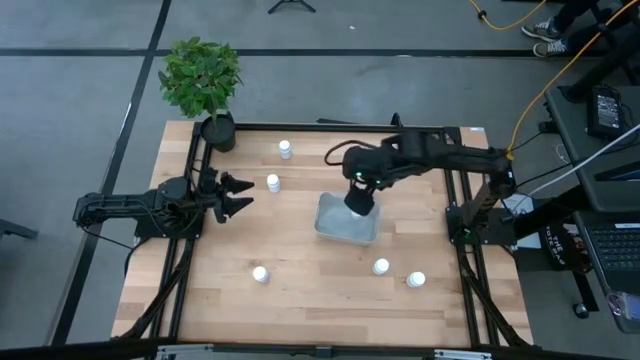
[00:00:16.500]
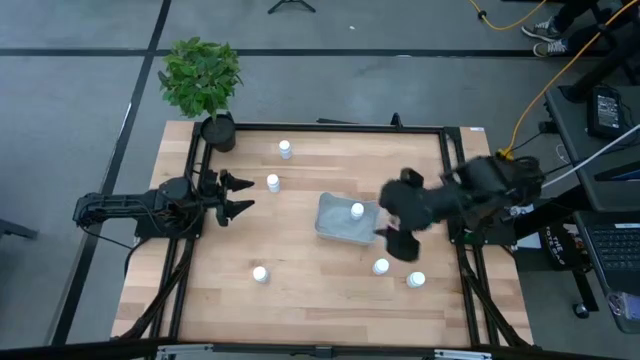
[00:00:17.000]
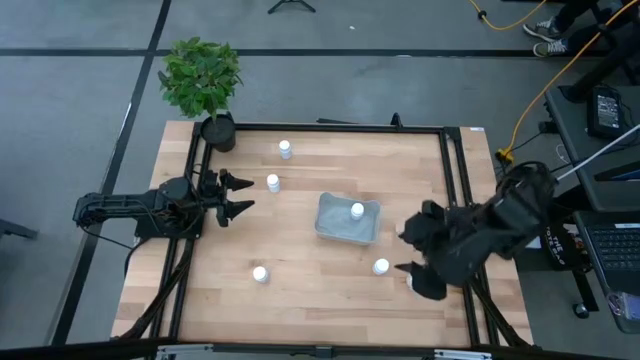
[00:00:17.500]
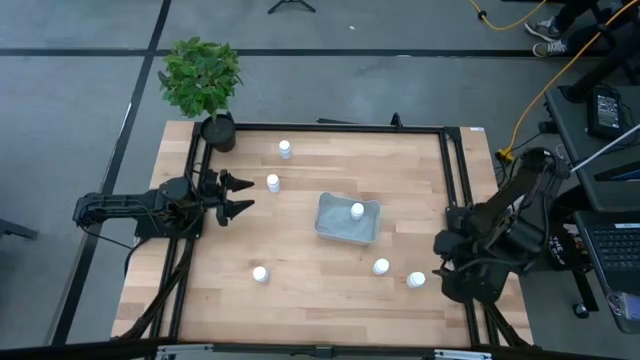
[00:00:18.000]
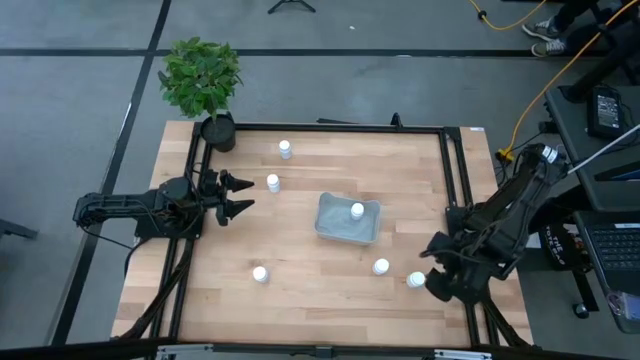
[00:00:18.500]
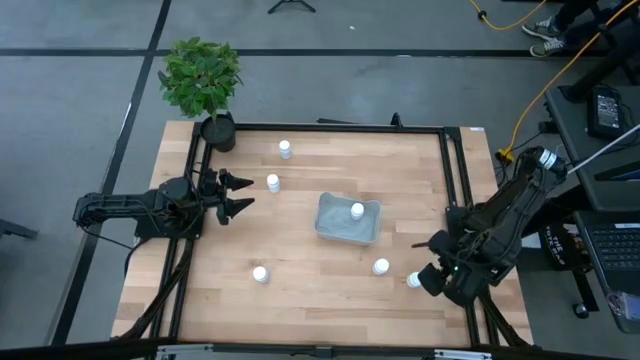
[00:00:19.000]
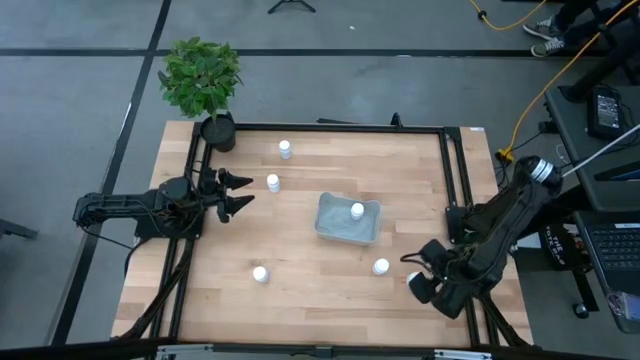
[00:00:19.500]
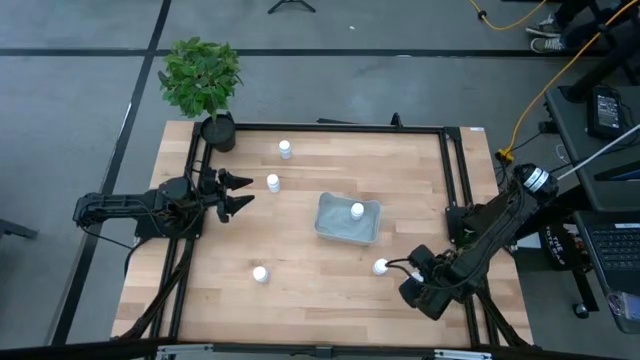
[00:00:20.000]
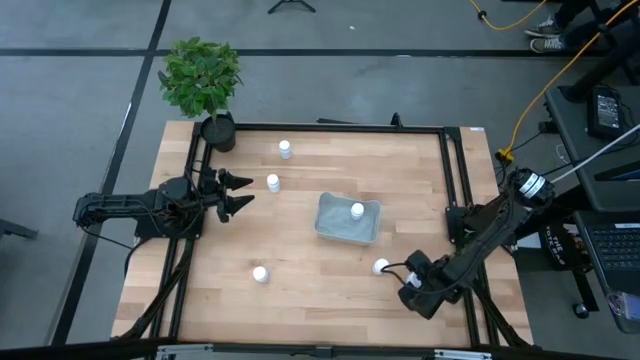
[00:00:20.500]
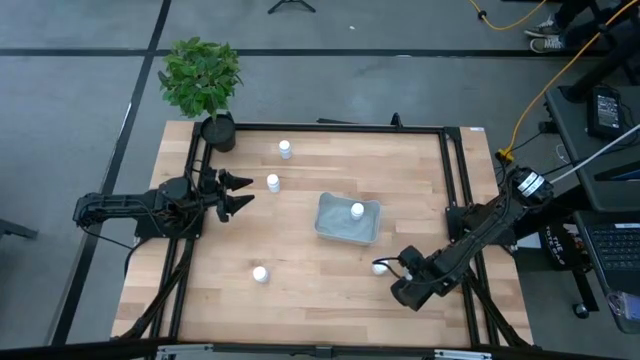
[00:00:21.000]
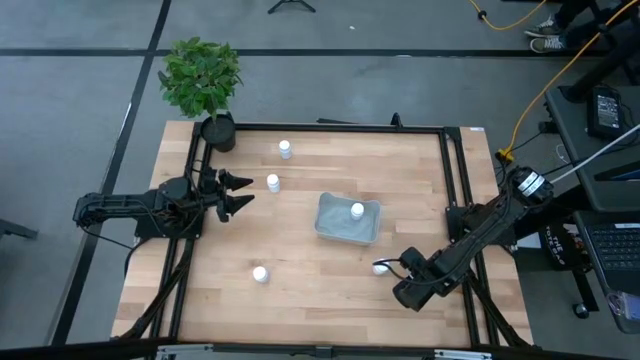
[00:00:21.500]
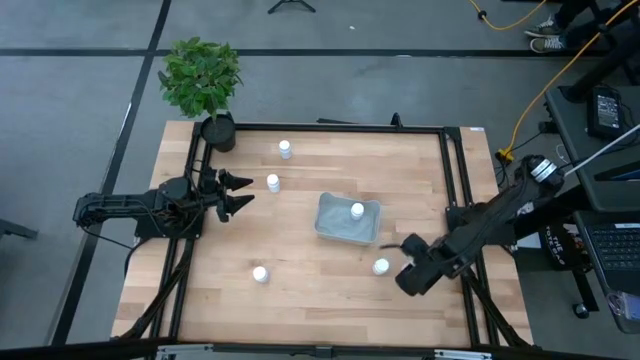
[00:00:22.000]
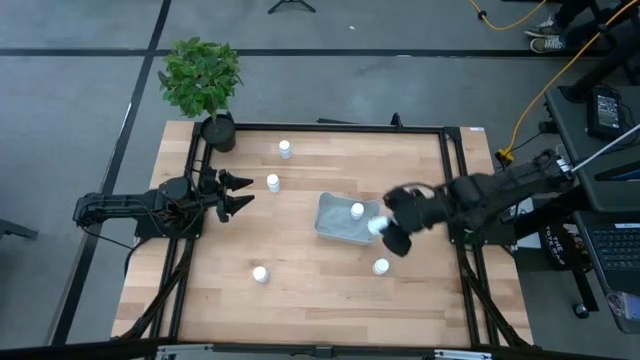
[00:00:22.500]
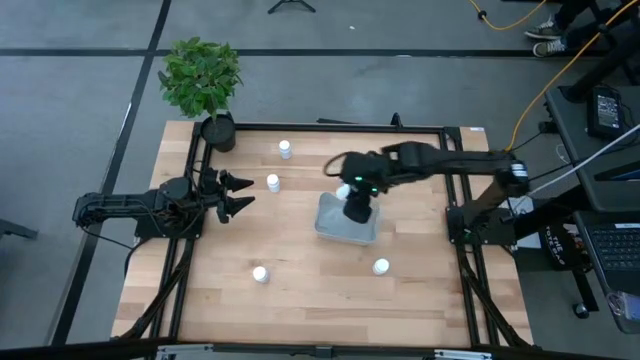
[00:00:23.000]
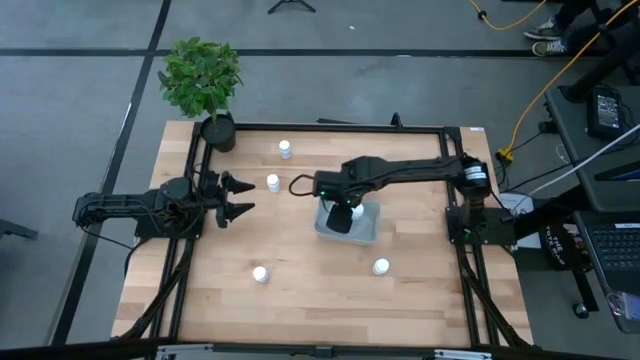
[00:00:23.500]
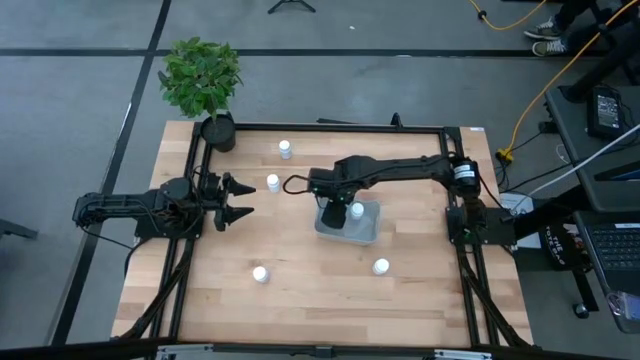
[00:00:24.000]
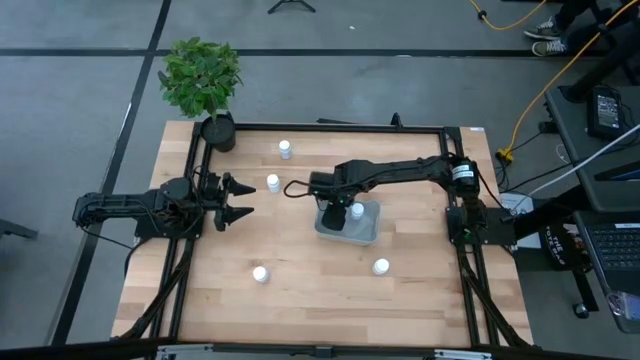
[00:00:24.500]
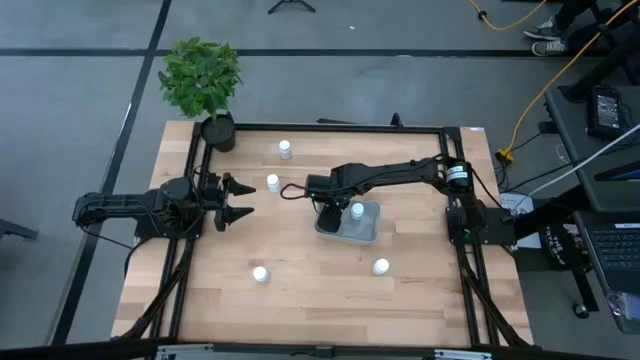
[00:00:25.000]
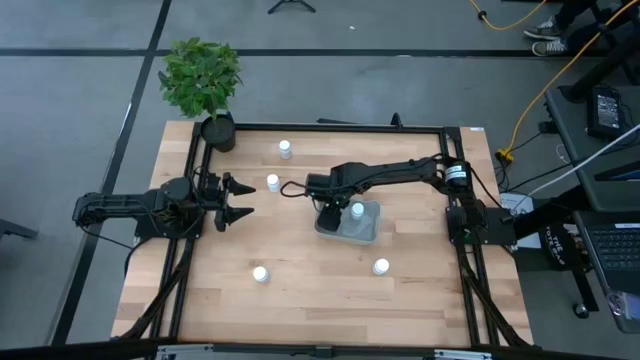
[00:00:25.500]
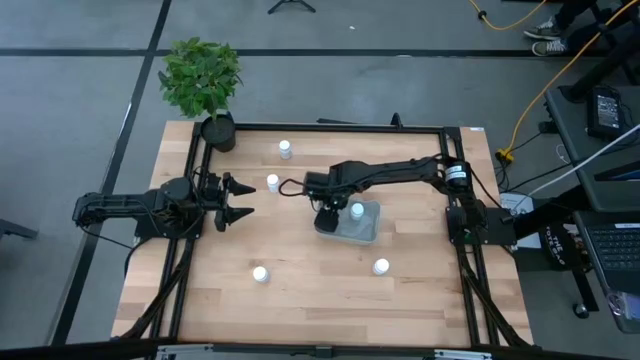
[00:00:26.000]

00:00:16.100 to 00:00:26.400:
Task: Pick and place pill bottles into a basket
Put the bottom white small pill bottle into the bin

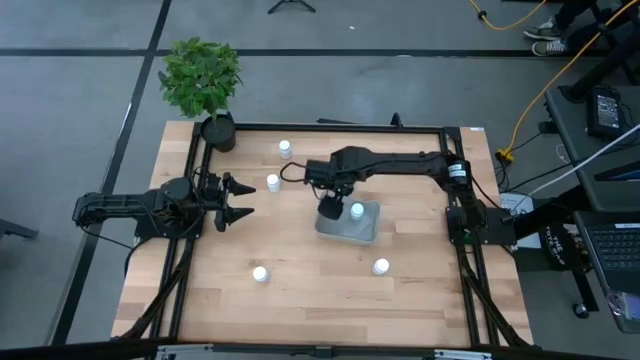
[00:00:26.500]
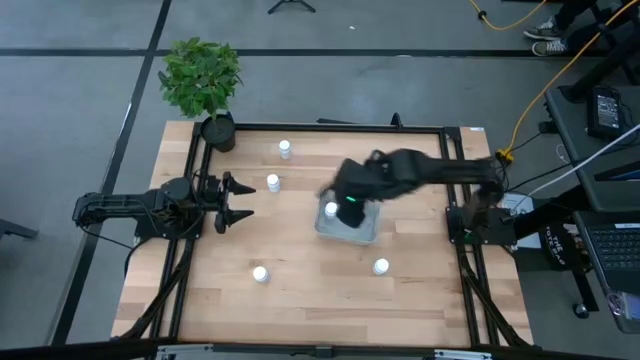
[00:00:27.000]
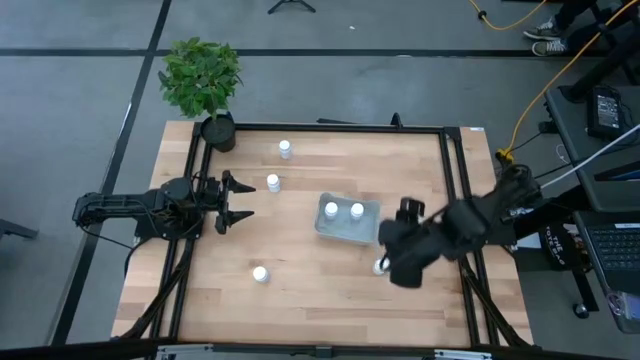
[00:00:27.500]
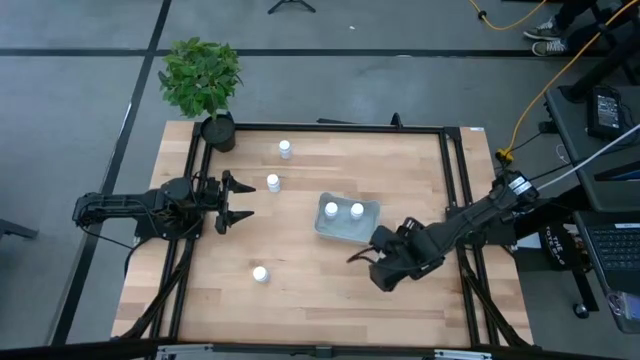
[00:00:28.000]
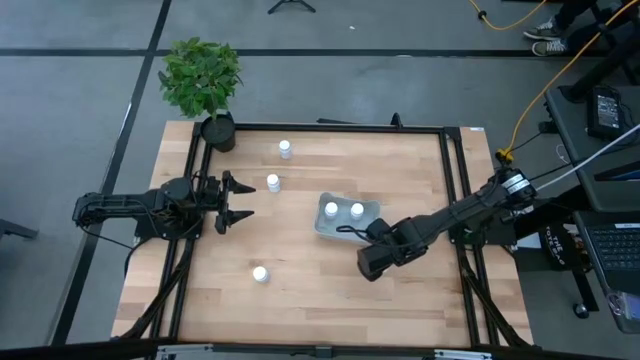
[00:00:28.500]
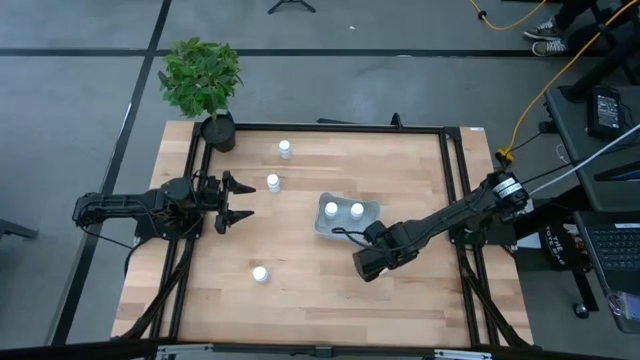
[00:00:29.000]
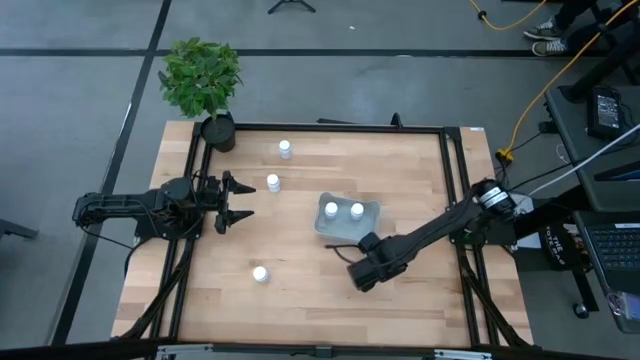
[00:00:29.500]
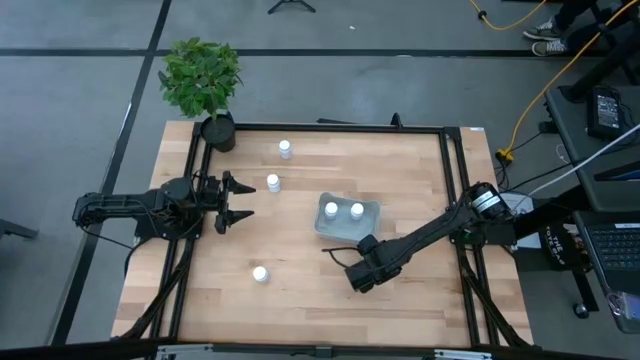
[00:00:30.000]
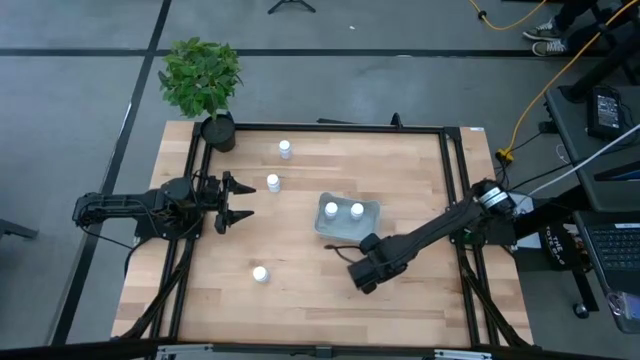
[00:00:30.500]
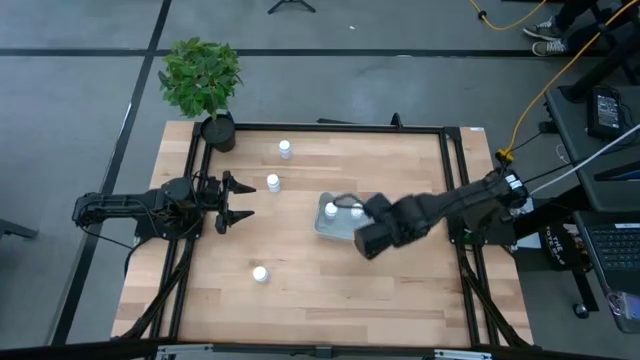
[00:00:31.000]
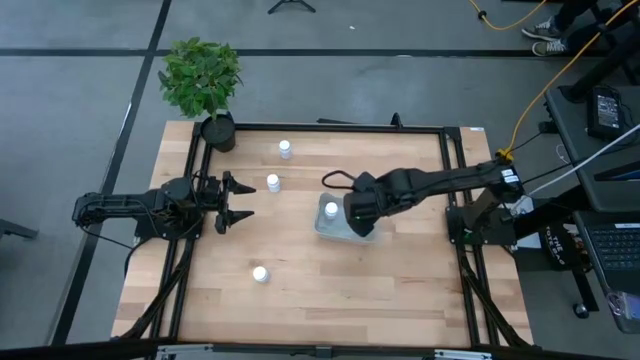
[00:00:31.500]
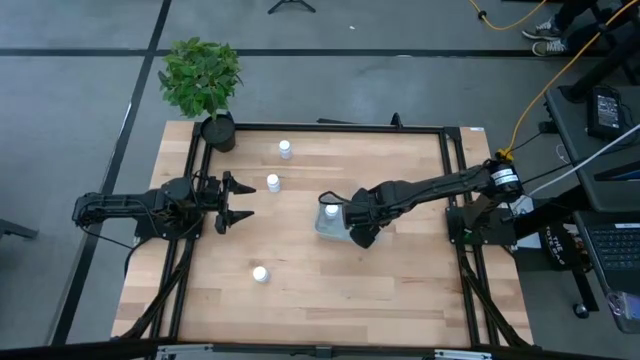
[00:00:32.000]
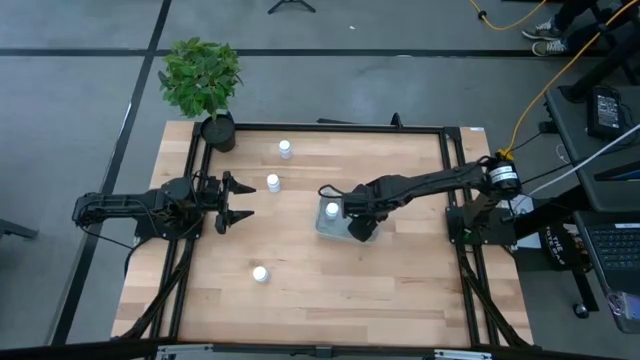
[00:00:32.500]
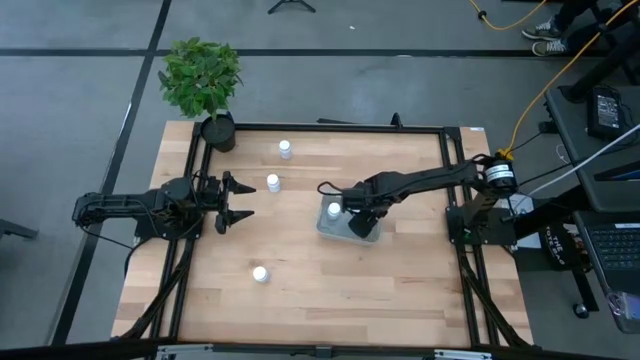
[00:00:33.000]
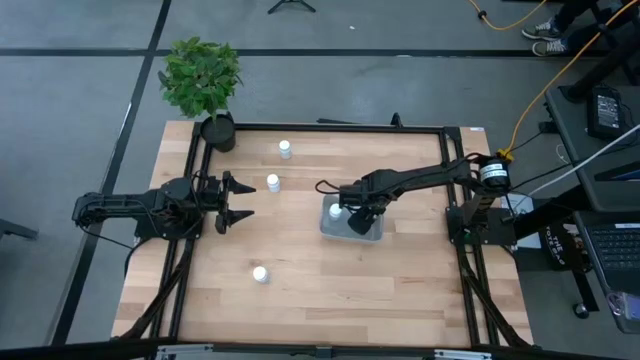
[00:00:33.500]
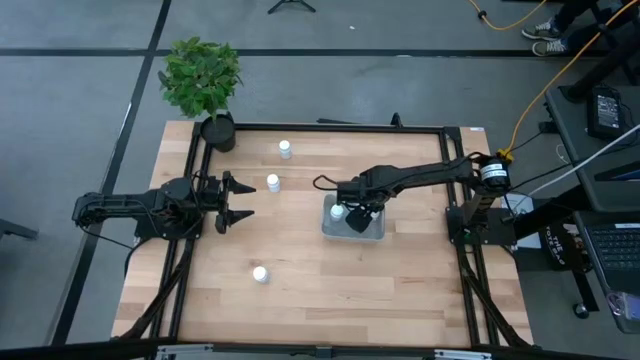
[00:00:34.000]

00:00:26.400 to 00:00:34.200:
Put the white small pill bottle into the bin

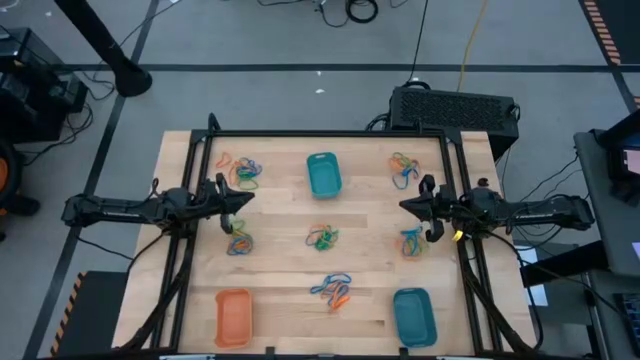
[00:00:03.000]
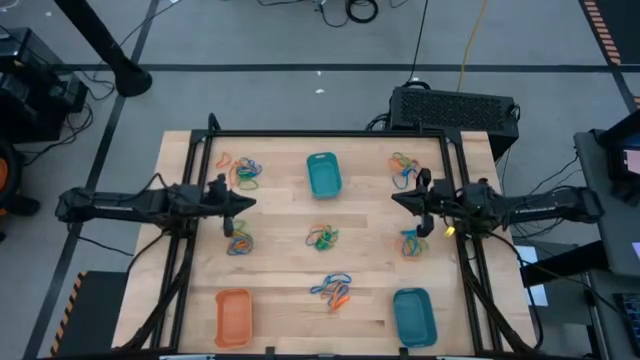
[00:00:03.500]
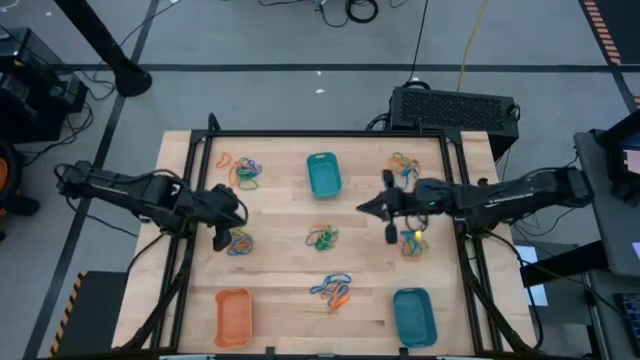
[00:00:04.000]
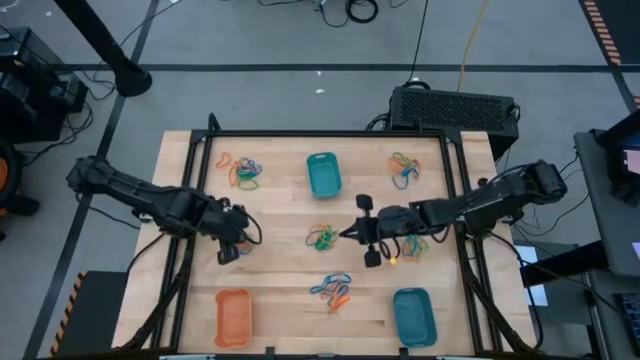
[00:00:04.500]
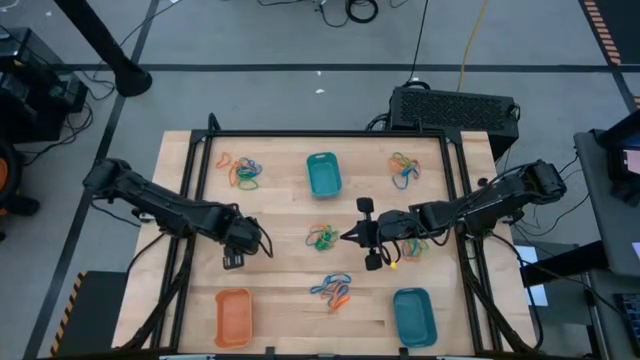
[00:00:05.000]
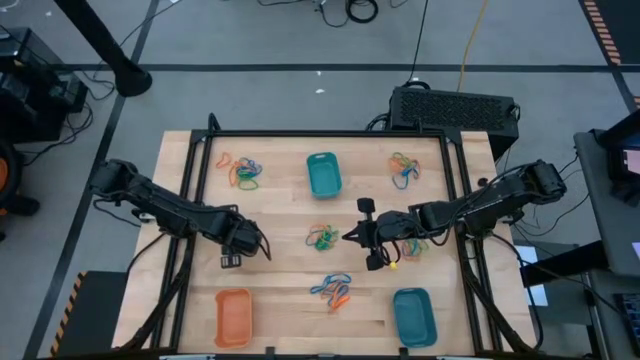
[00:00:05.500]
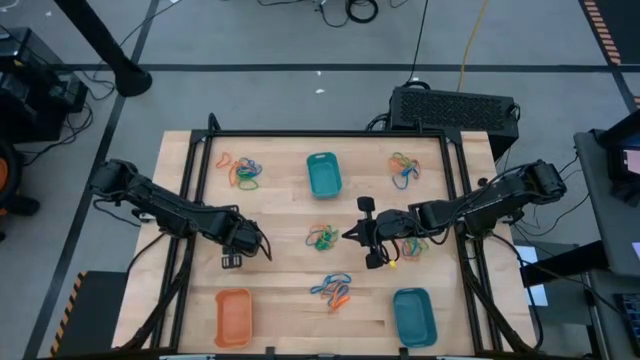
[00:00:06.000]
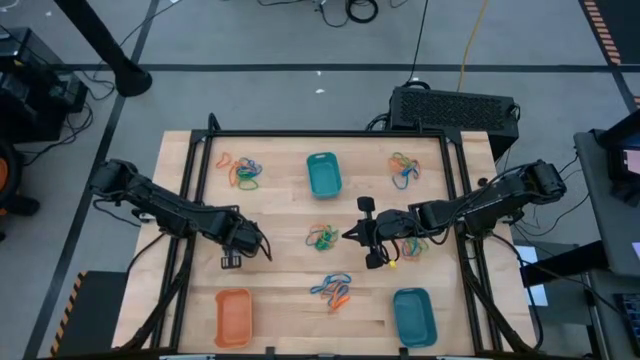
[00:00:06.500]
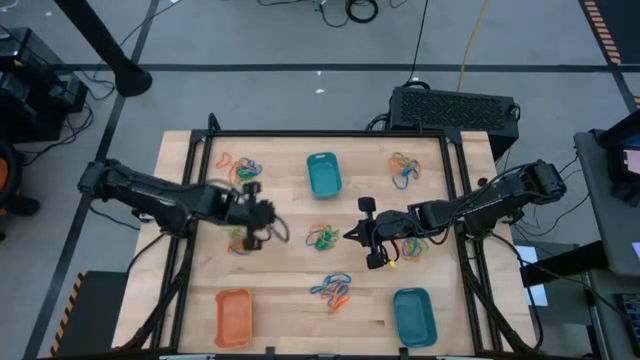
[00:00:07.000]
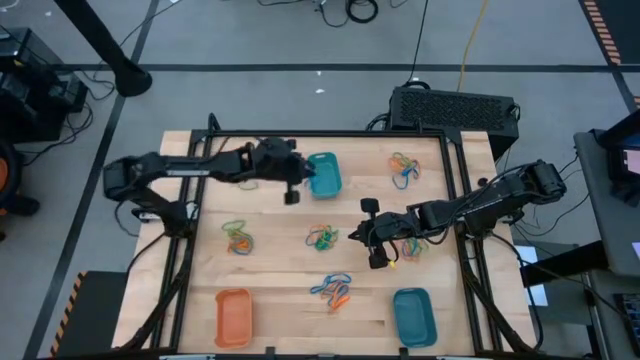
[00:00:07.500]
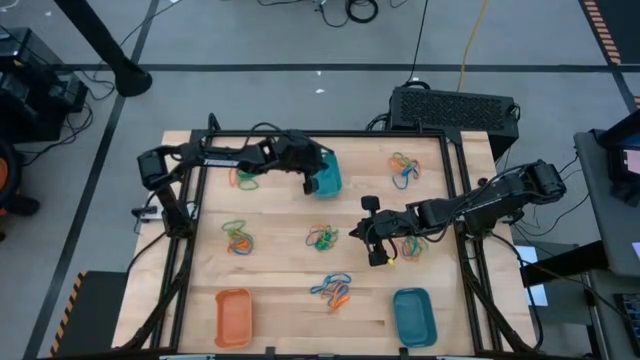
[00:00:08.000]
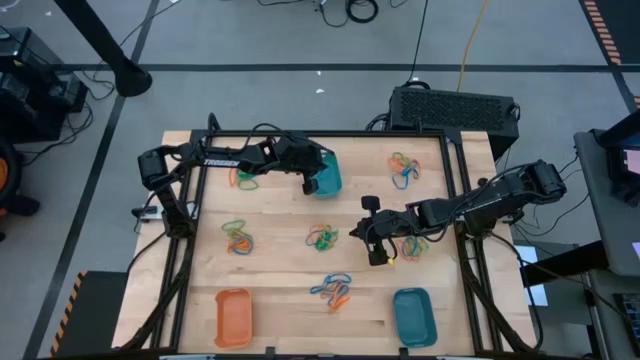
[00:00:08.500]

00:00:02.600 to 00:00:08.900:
Task: Sort rubber bands into baskets
Put the blue rubber band into the top blue bin
